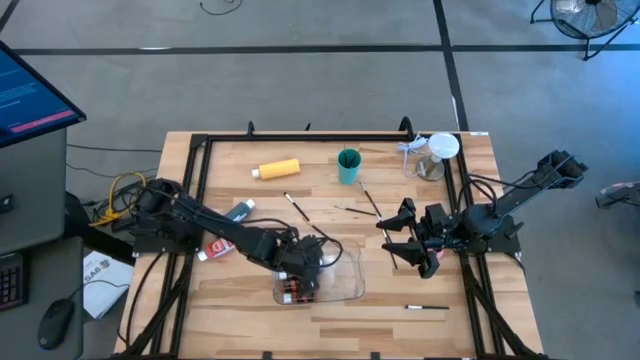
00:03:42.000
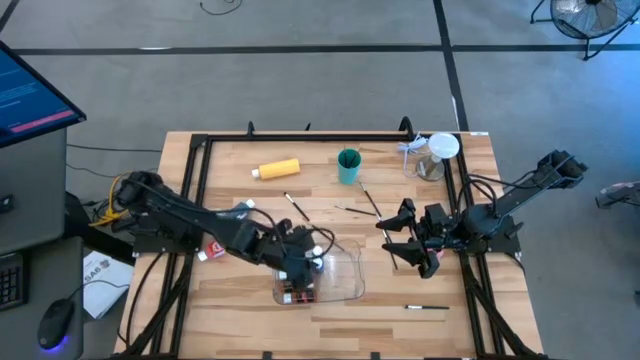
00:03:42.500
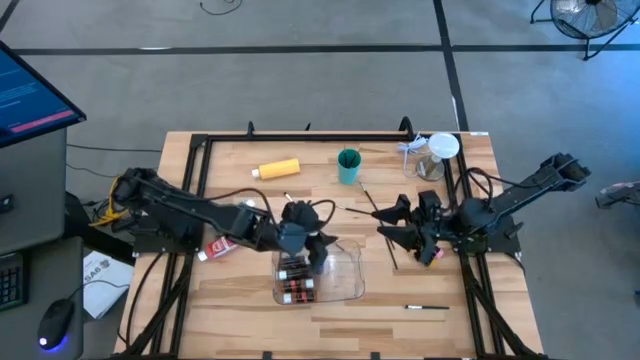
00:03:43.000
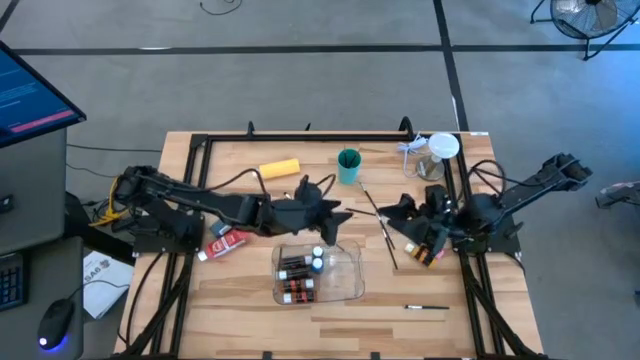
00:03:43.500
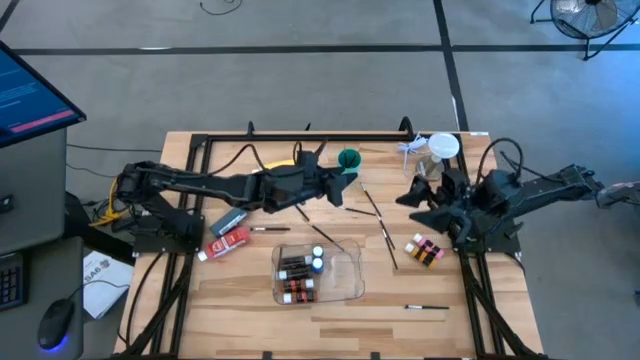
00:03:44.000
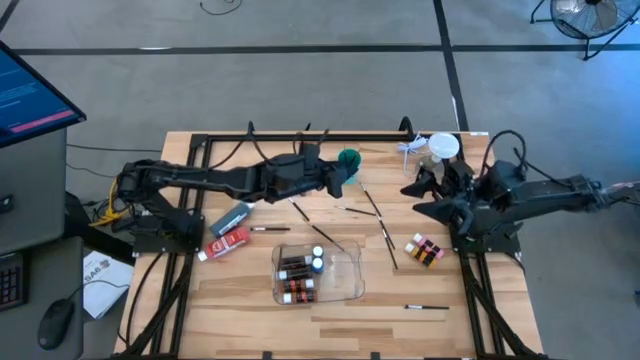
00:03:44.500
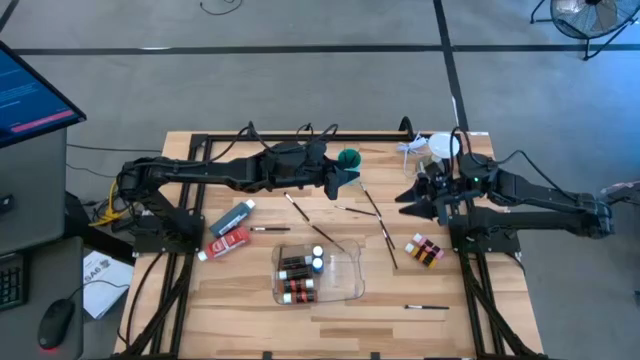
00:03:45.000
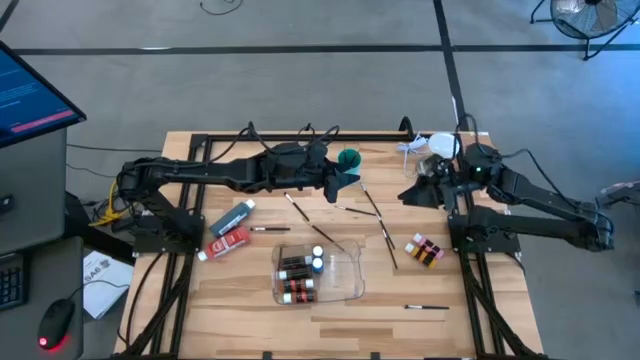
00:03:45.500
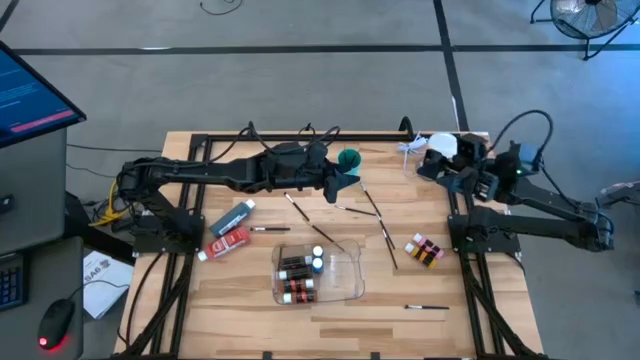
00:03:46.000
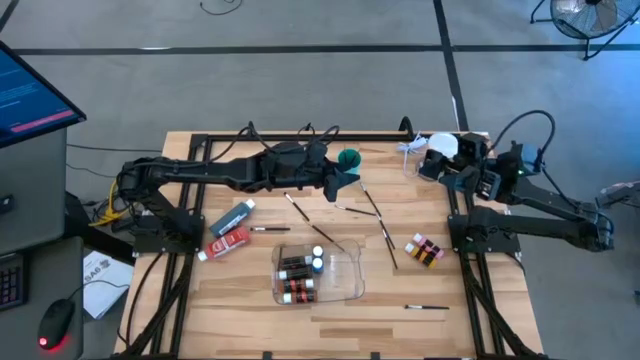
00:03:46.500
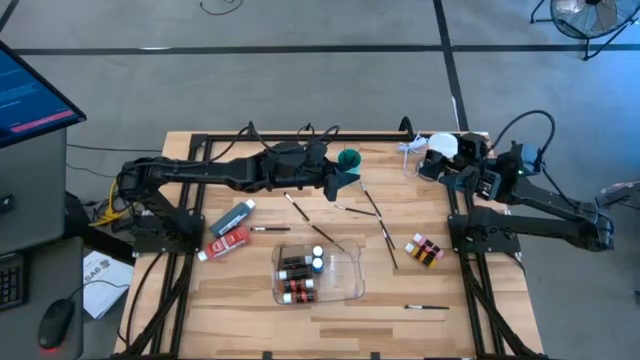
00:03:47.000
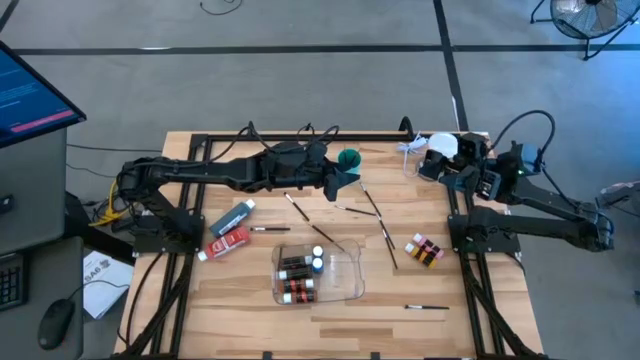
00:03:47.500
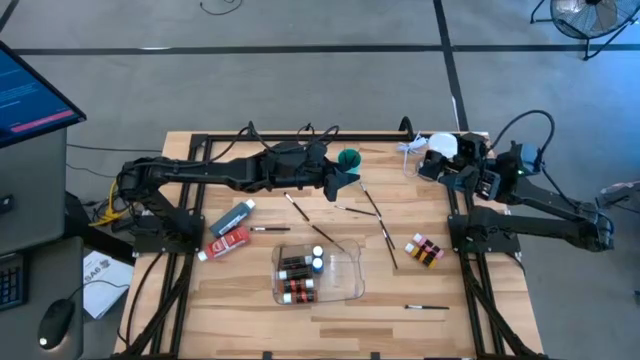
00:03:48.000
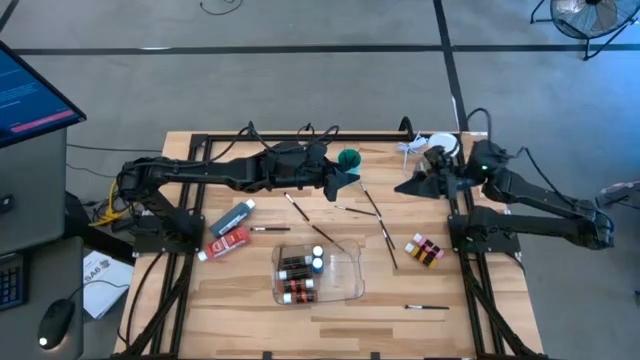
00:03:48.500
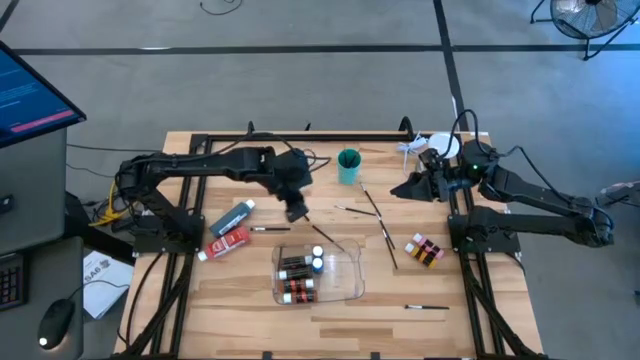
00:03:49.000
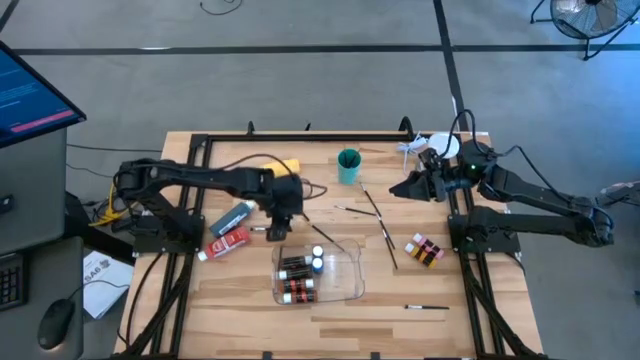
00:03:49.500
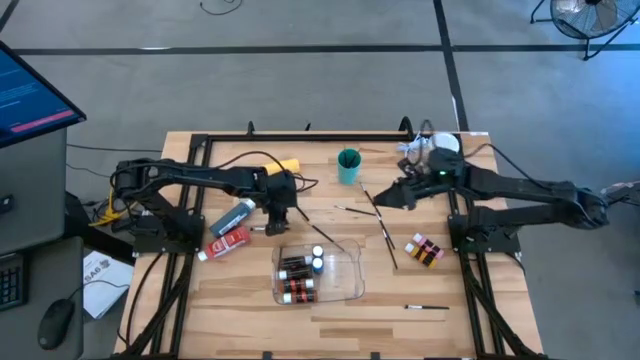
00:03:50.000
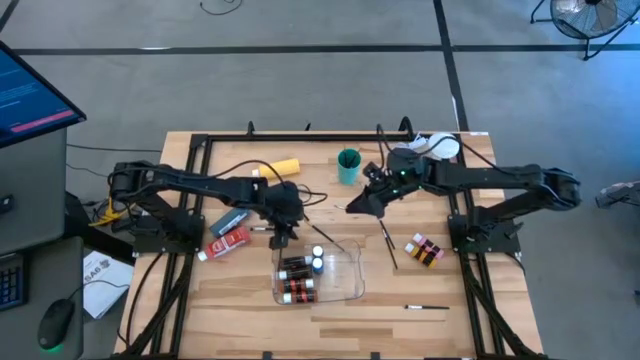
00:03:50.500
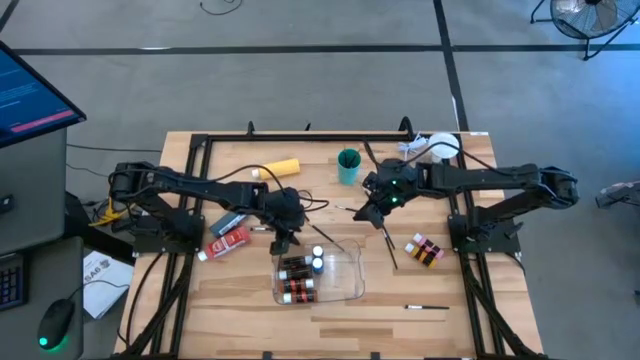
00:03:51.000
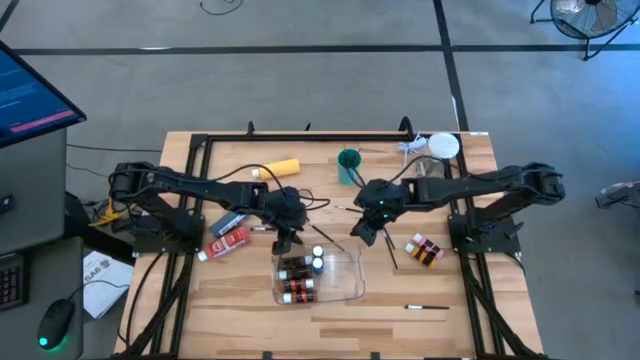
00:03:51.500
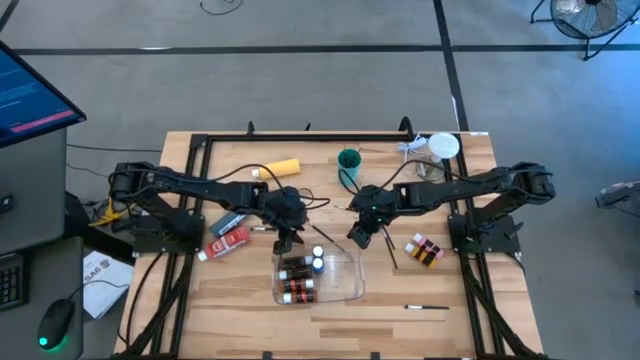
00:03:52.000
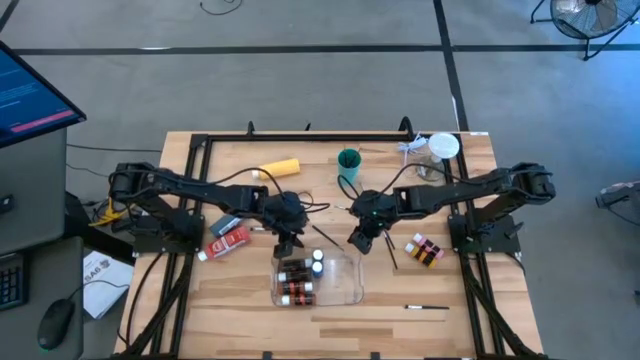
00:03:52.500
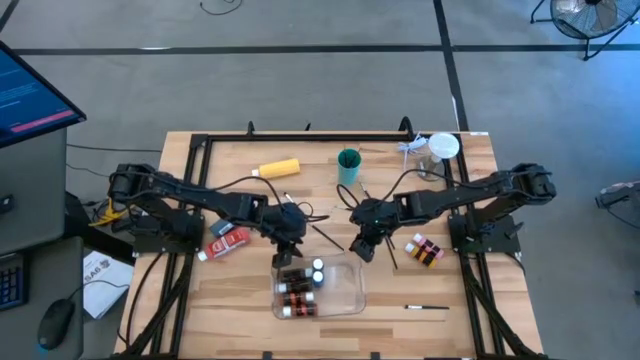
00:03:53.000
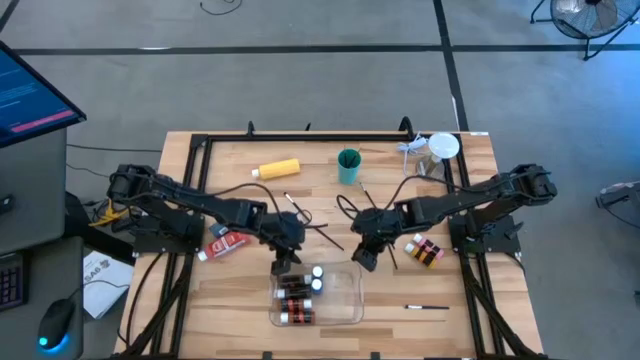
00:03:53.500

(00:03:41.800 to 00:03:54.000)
Task: Pick & Place Paint Supplies
Adjust the transparent bin

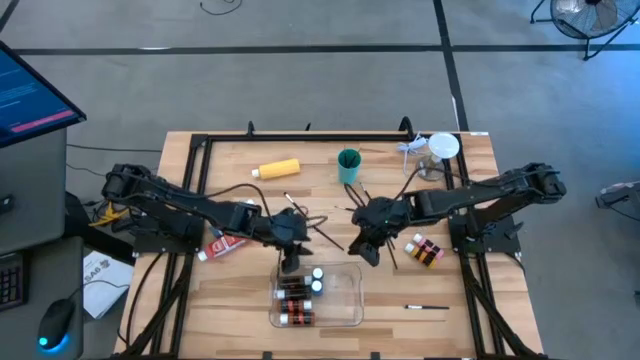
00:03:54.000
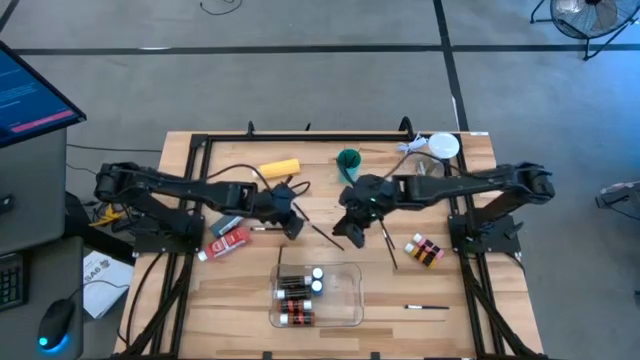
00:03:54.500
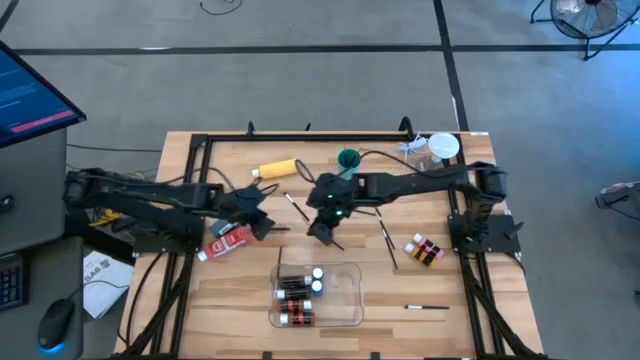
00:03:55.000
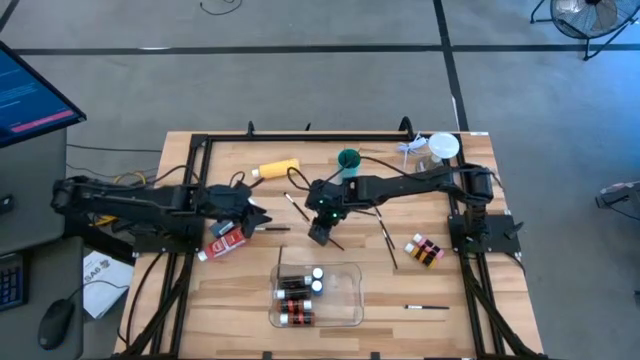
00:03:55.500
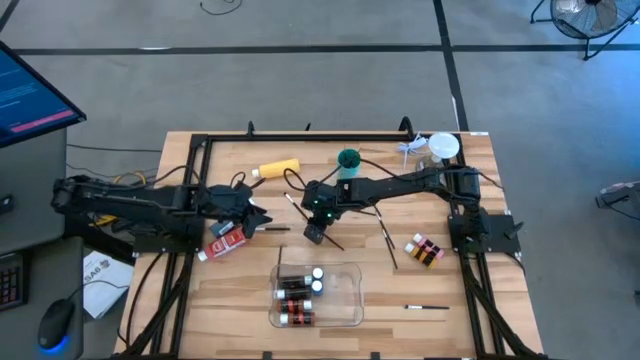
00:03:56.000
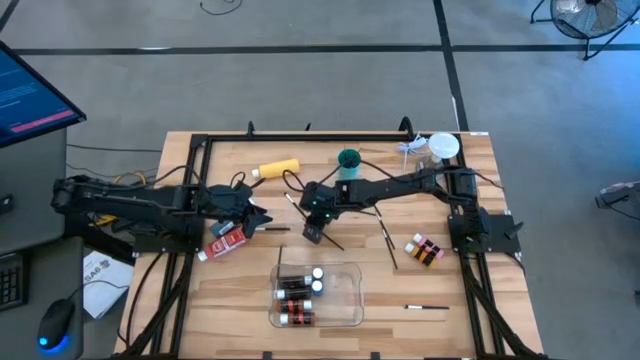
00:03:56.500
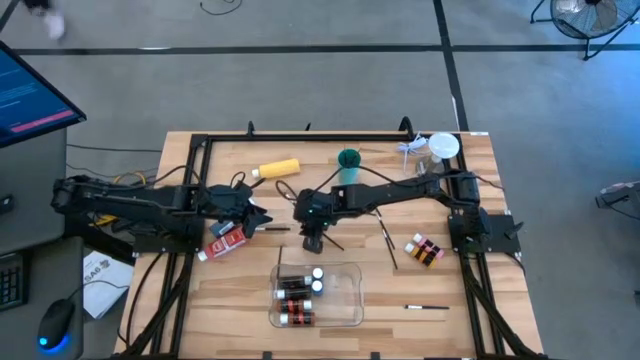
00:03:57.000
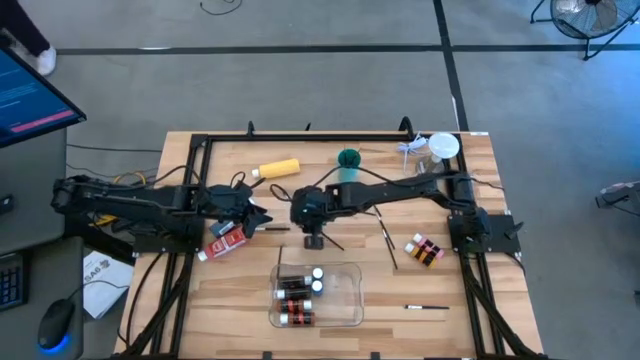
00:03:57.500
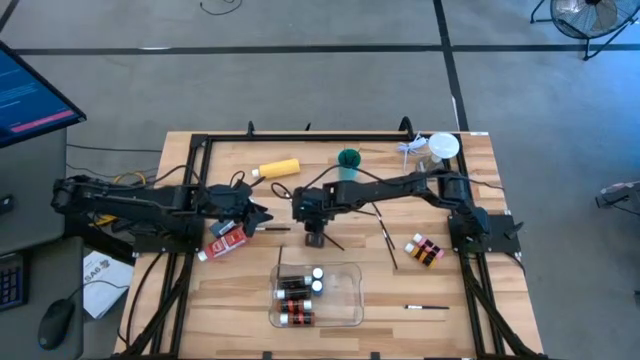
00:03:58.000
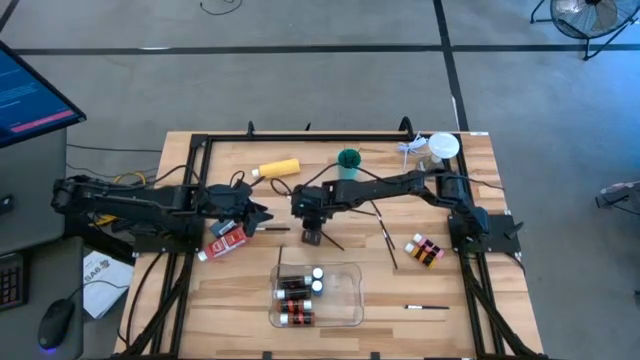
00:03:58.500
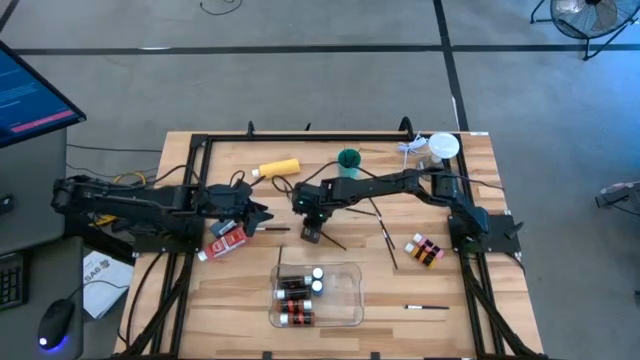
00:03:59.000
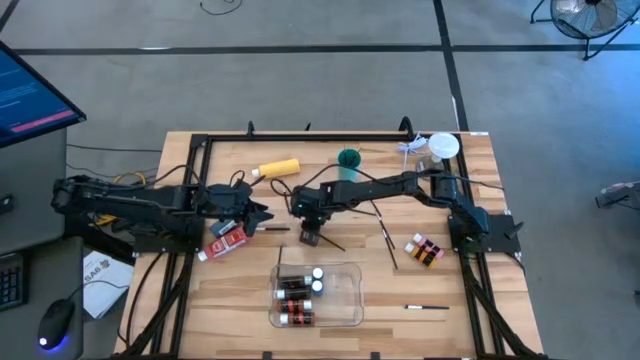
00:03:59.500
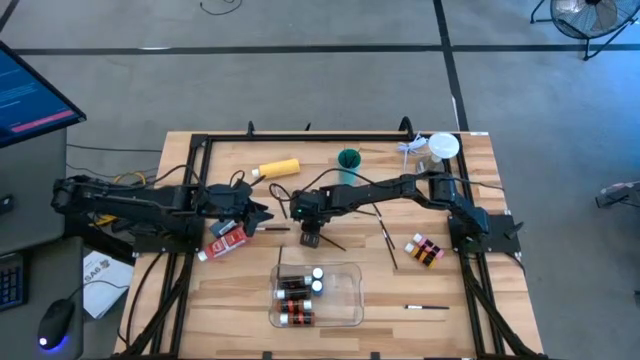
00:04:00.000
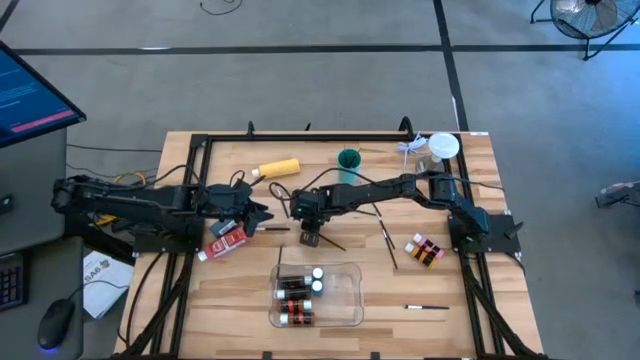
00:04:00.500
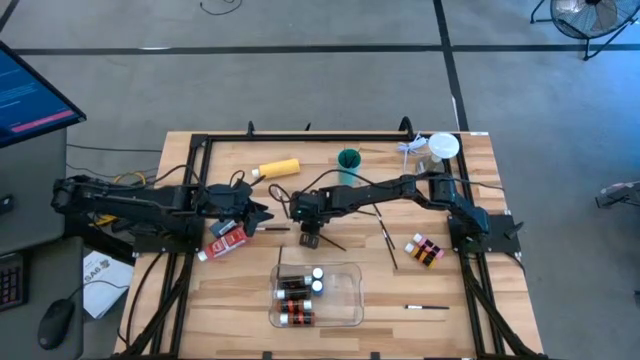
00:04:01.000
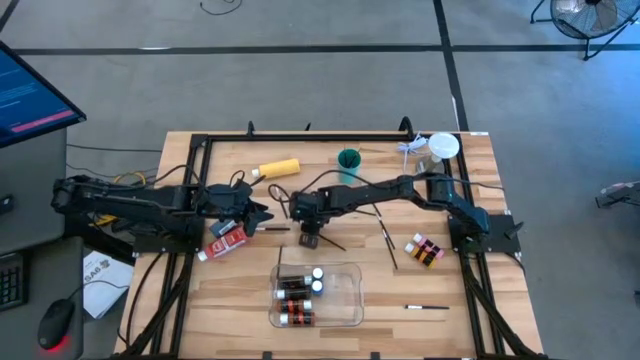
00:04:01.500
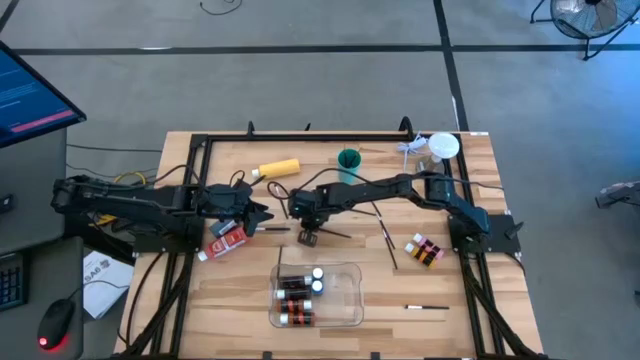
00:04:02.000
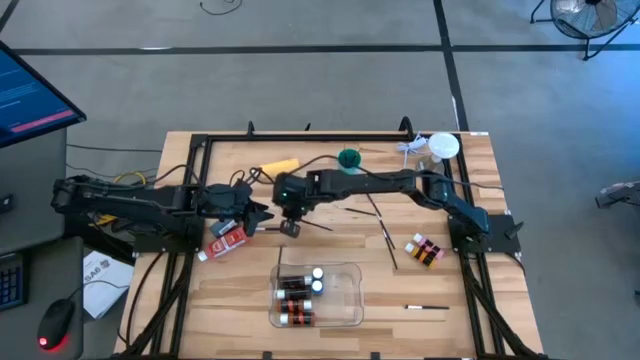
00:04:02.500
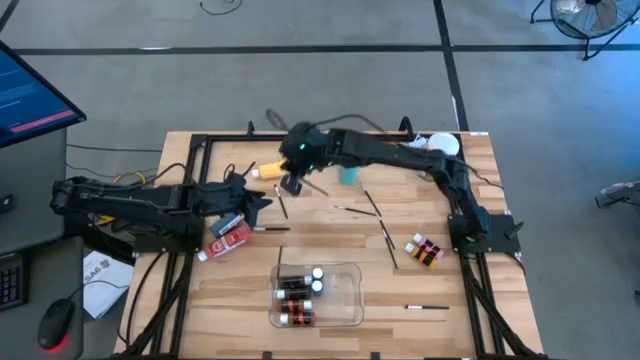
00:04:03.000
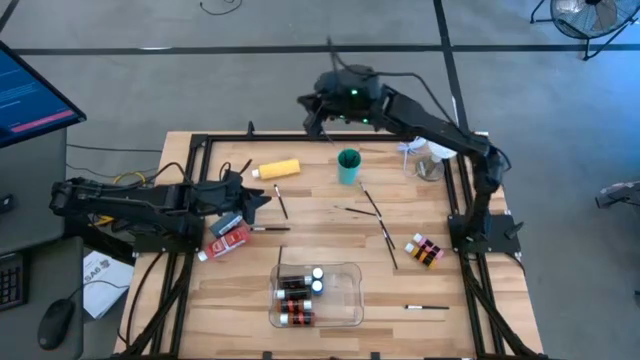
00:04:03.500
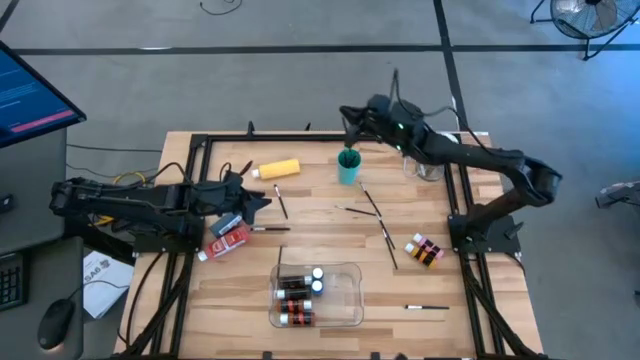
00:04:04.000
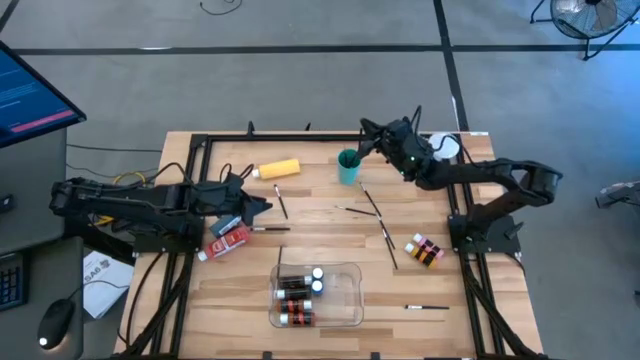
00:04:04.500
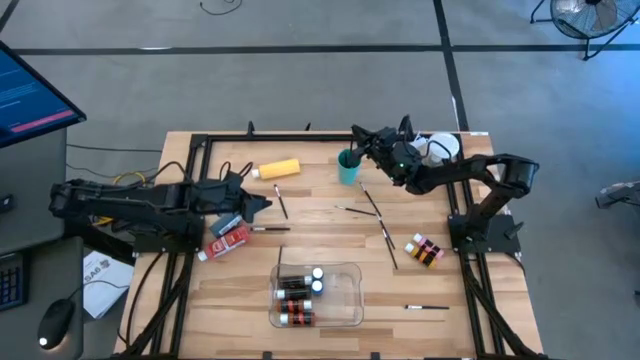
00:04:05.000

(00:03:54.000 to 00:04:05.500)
Put the gold paint brush into the green cup
